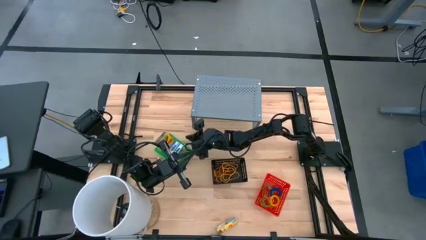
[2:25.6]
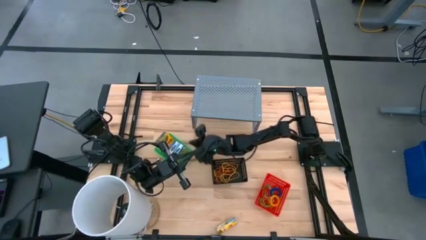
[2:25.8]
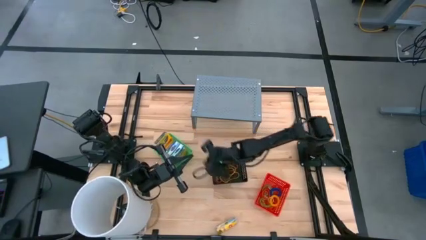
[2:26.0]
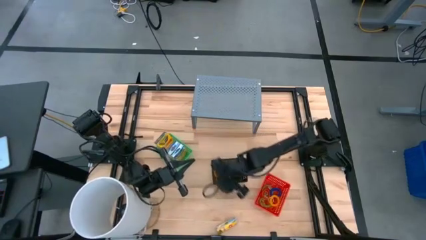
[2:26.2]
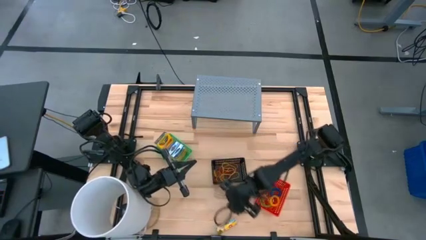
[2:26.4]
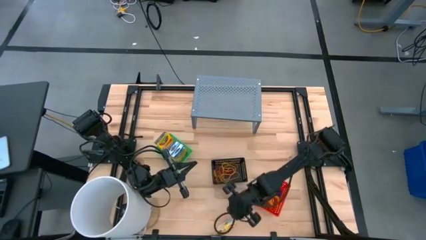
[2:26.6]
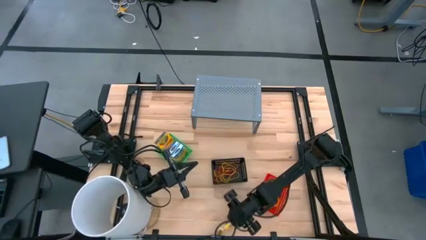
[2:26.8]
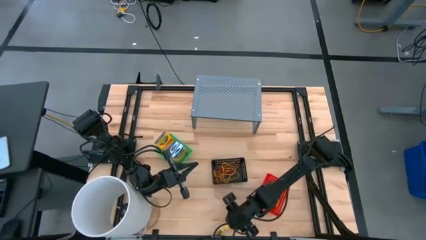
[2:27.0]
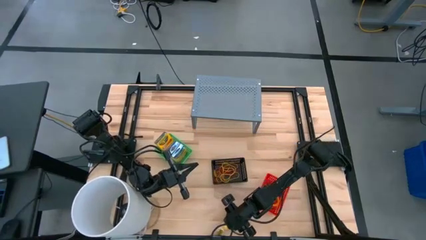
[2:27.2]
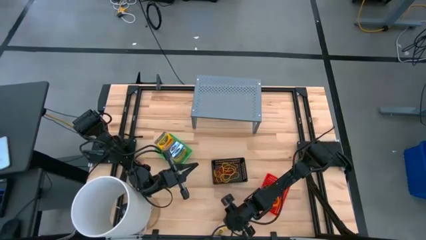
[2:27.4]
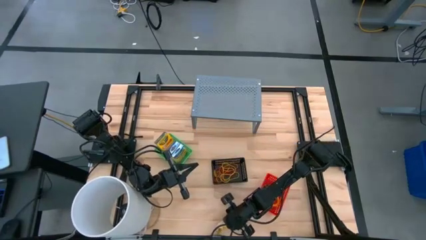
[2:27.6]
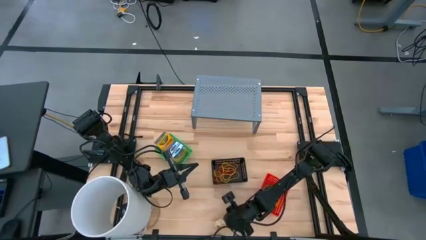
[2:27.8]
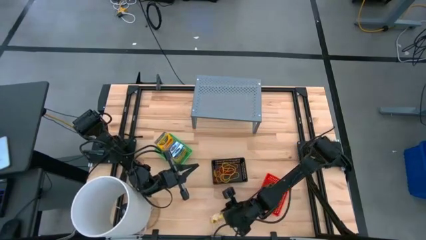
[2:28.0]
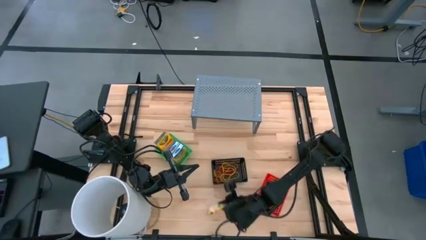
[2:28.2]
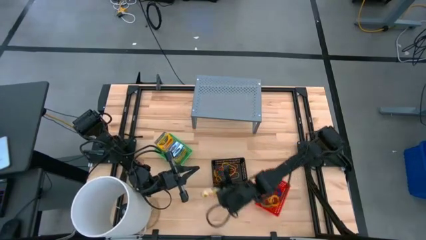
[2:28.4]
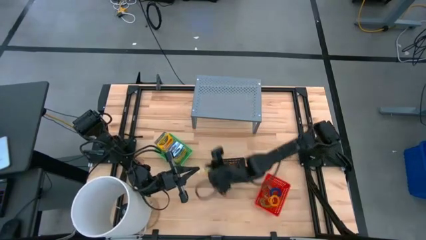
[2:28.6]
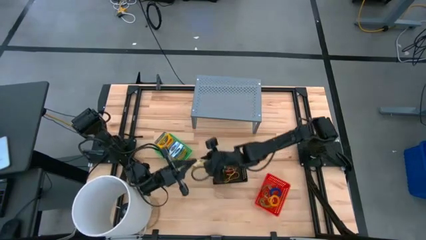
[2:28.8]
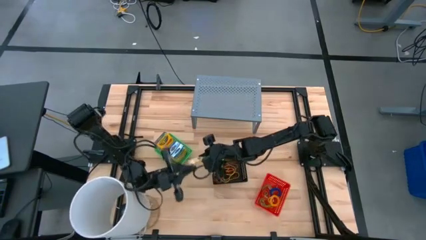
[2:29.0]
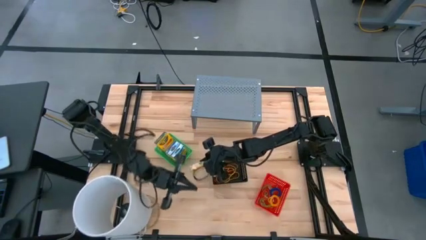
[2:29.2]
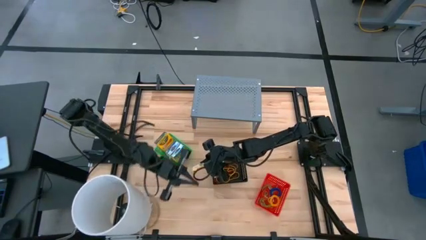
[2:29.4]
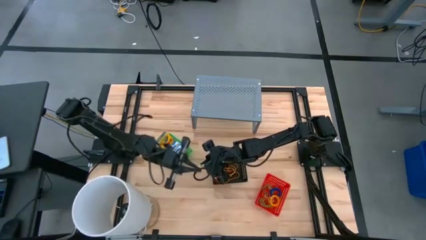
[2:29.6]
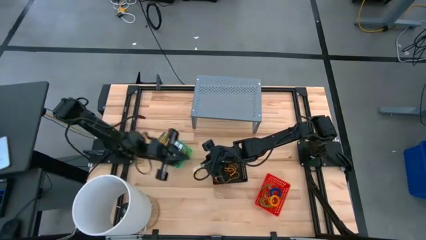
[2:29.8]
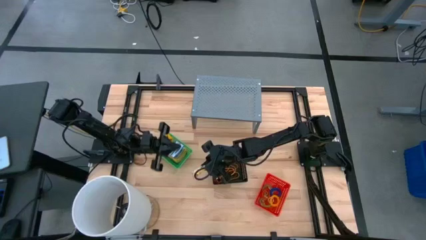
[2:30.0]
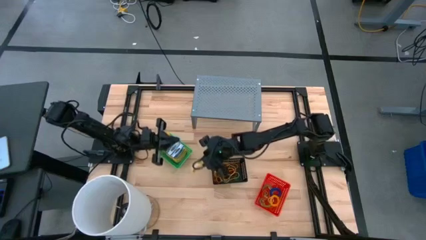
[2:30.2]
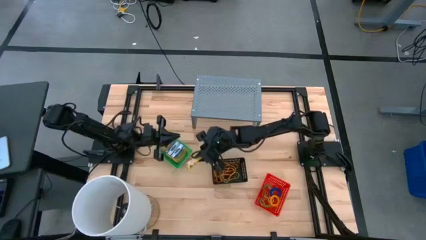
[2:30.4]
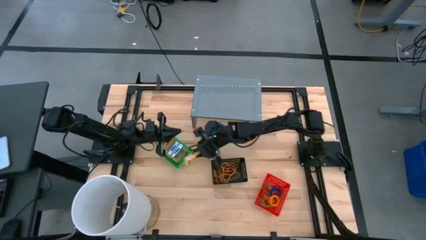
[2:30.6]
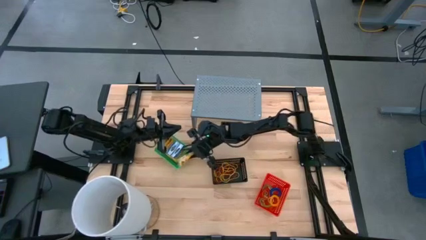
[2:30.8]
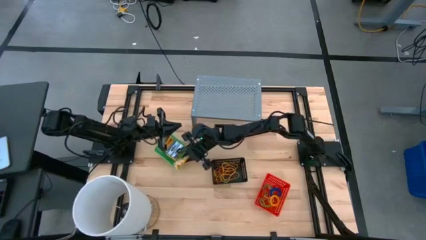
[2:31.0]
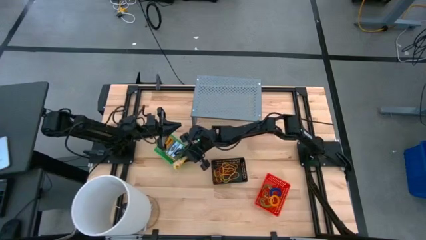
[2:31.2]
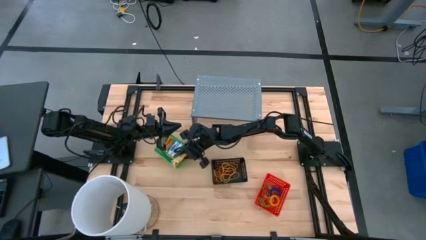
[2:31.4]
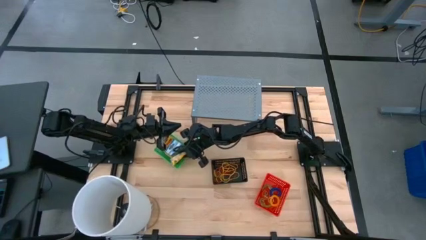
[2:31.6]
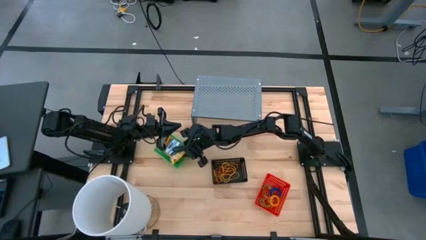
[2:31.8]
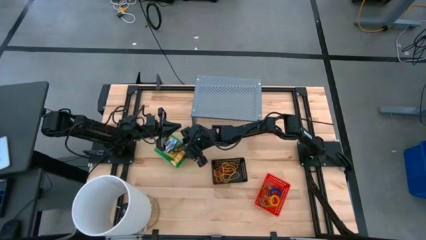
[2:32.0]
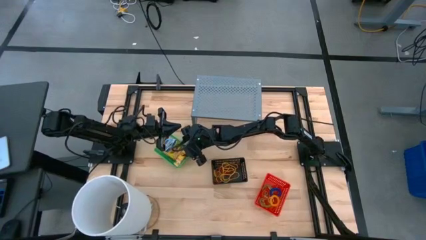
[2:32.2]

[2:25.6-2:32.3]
Task: Pick & Place Office Desk Supplies
Put the yellow crayon box into the green bin

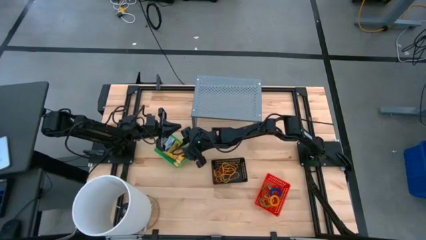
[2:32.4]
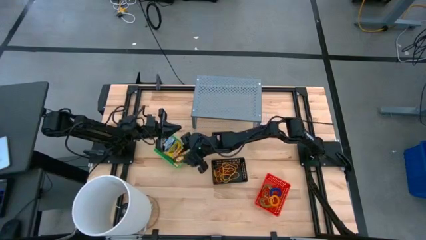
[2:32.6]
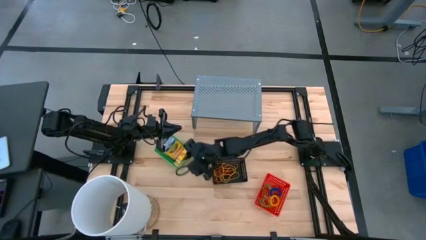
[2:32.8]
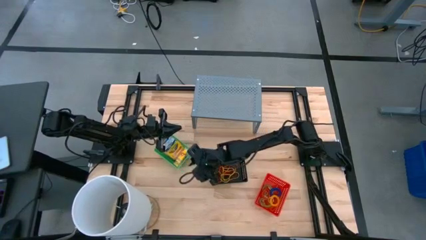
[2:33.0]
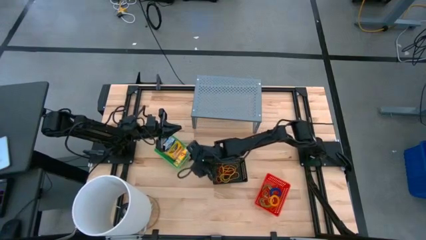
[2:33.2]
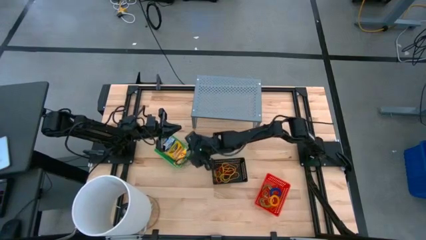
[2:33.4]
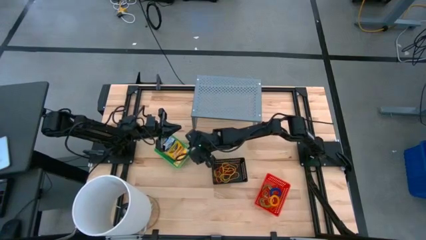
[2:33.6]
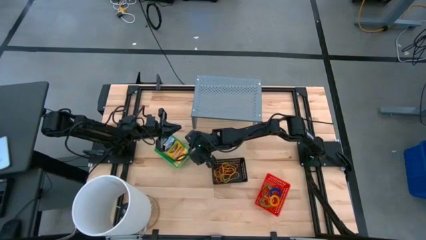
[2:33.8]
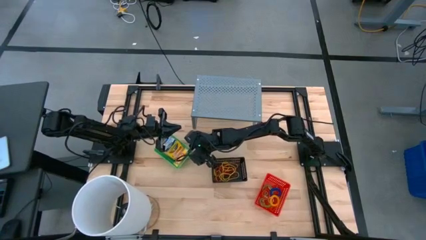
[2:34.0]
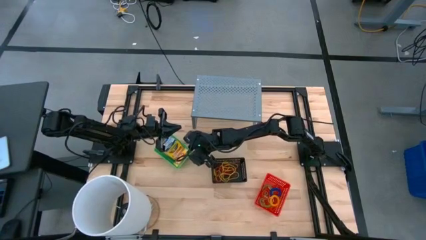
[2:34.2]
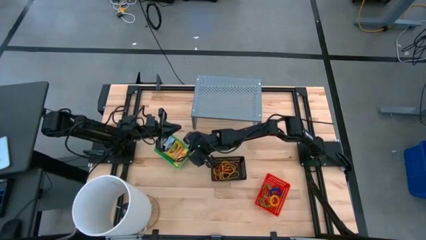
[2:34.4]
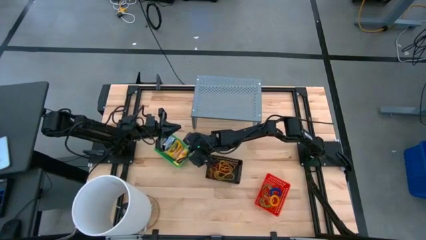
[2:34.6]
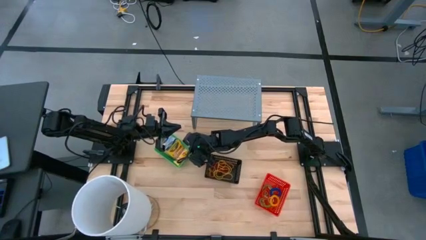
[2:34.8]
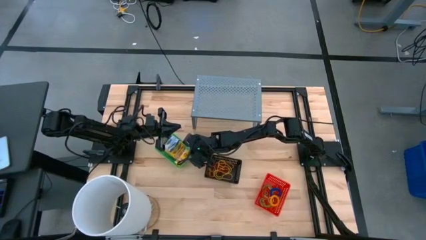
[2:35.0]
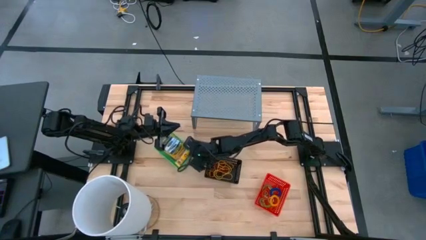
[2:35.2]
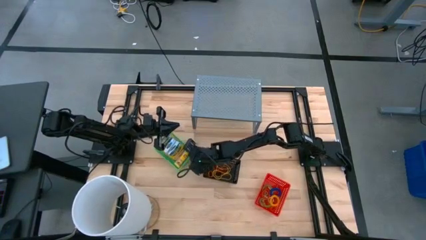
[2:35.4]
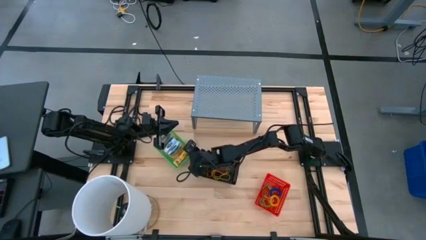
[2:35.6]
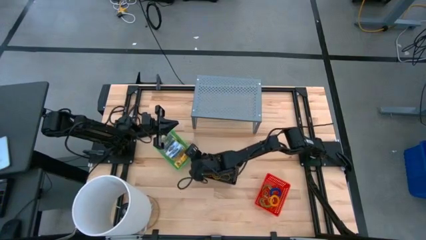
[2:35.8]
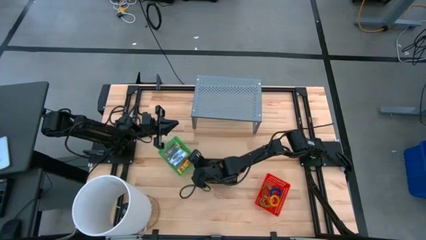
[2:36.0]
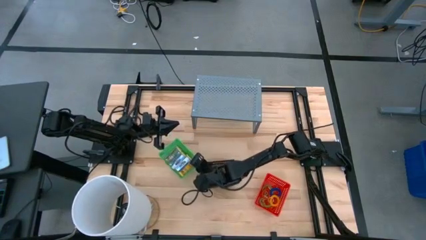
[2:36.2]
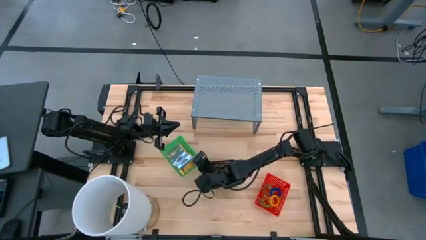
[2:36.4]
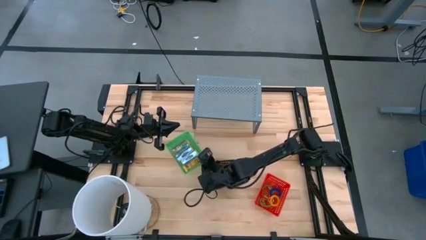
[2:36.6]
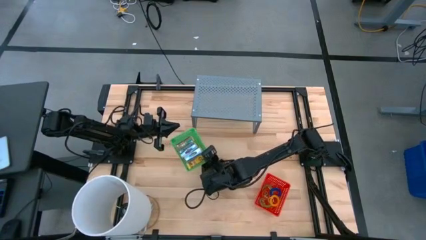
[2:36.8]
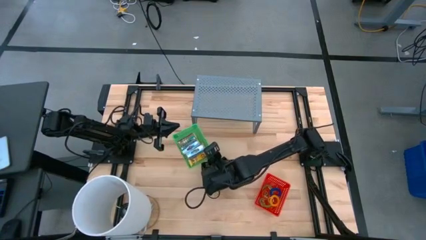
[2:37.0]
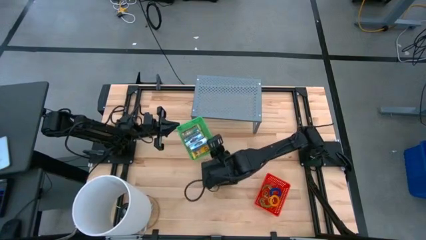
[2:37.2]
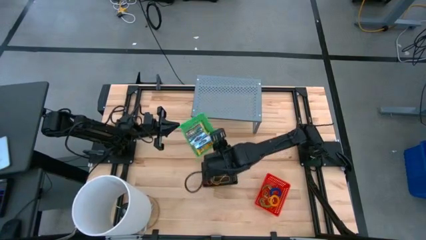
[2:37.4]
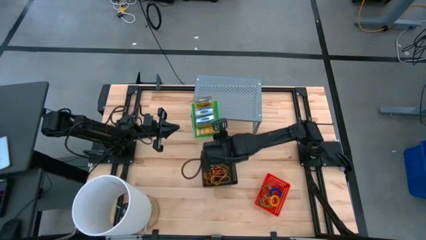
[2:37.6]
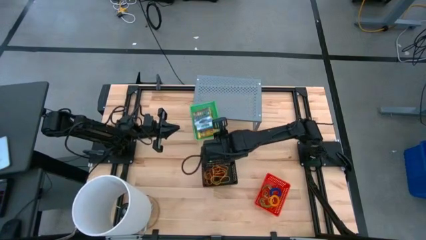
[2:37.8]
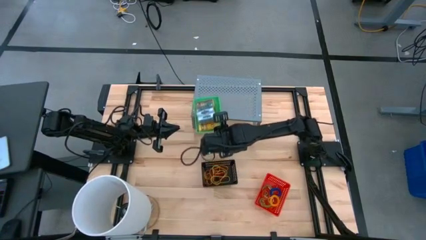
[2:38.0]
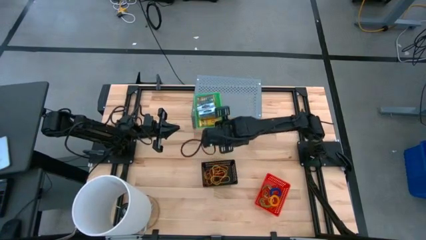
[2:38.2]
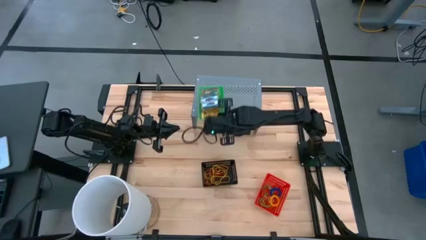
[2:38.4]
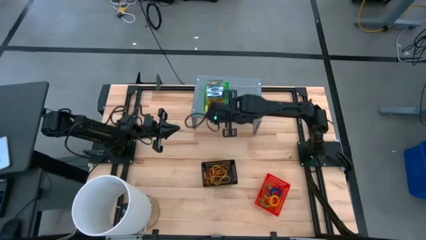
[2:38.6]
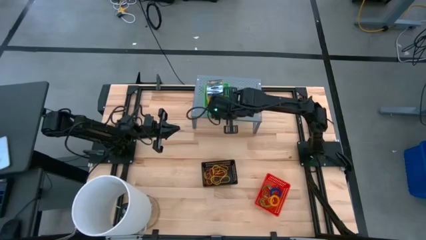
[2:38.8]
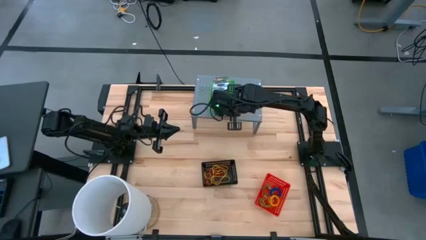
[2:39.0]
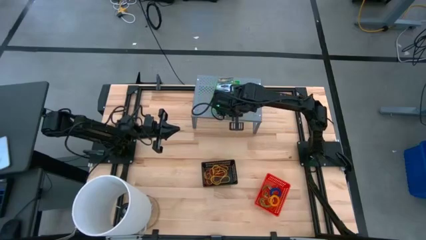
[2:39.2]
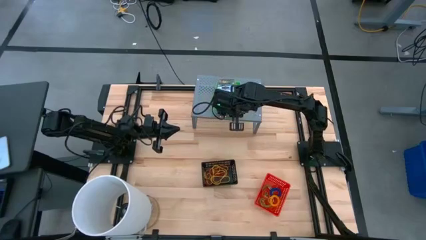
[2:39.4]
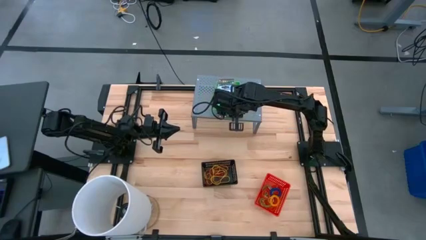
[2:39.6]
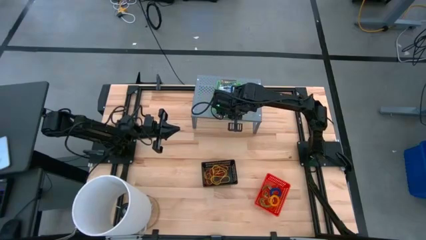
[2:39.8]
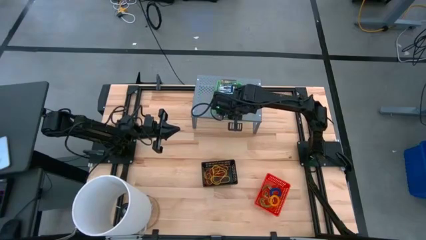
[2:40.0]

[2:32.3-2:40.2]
Put the green bin on the shelf
